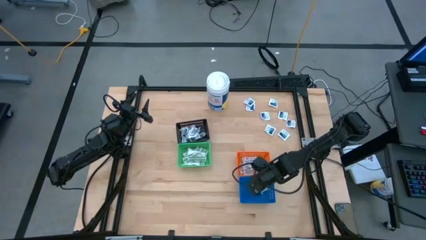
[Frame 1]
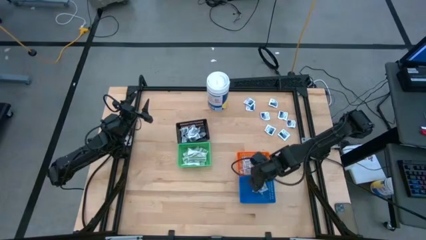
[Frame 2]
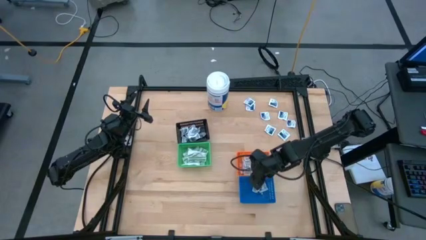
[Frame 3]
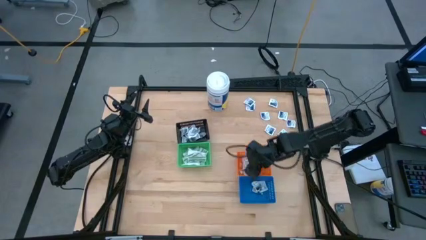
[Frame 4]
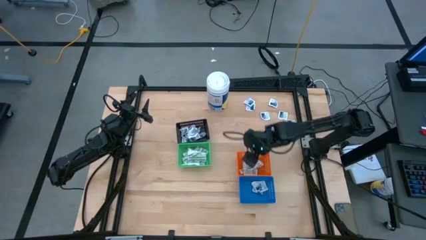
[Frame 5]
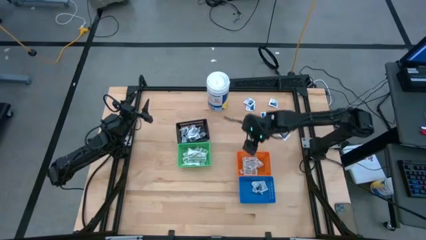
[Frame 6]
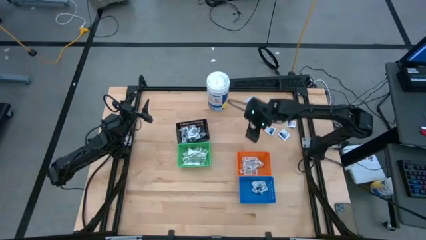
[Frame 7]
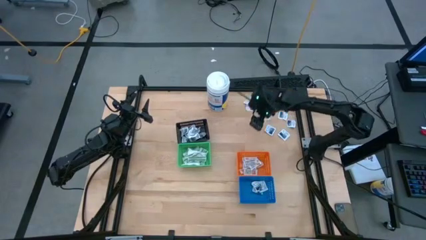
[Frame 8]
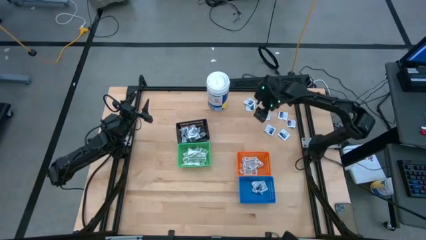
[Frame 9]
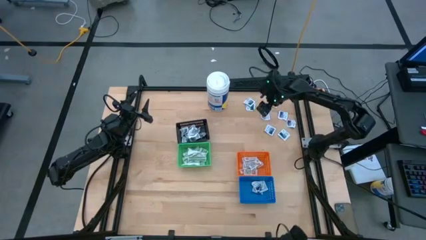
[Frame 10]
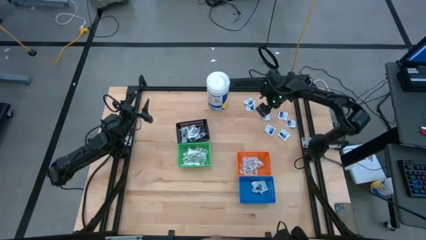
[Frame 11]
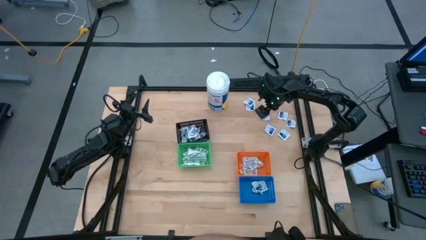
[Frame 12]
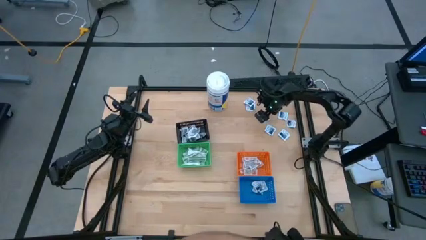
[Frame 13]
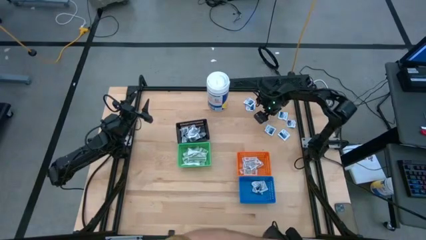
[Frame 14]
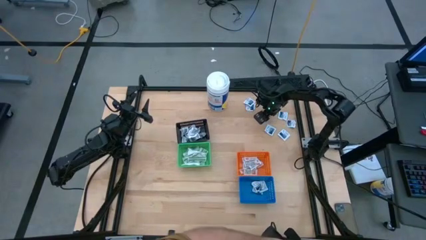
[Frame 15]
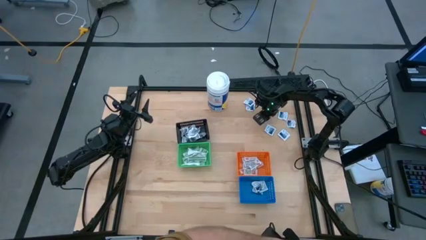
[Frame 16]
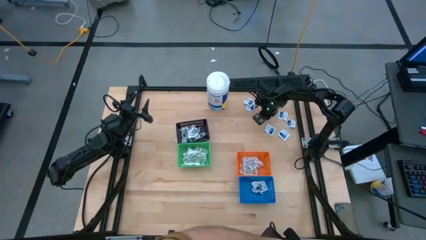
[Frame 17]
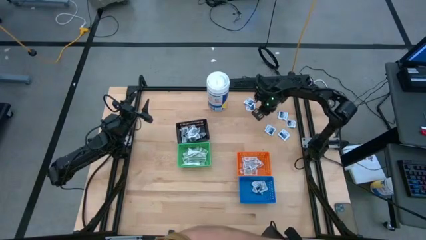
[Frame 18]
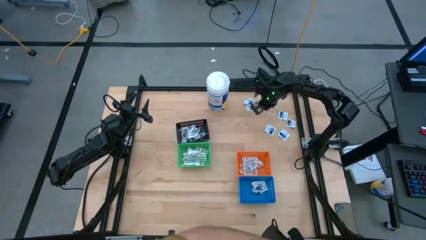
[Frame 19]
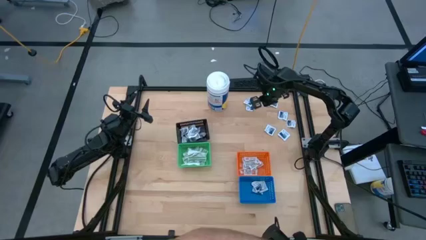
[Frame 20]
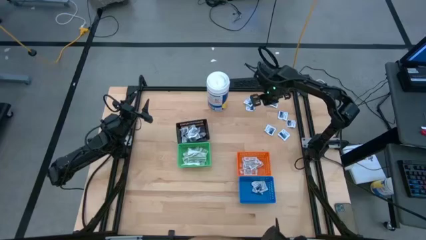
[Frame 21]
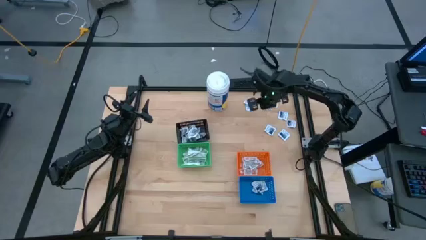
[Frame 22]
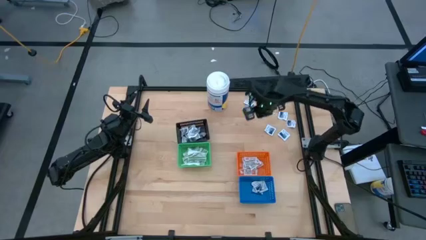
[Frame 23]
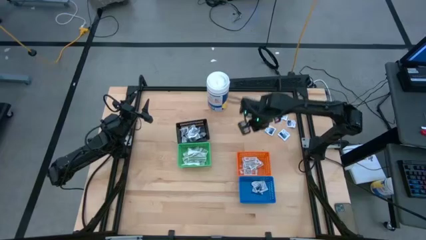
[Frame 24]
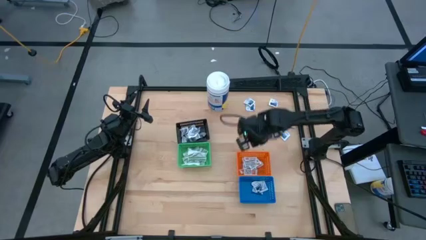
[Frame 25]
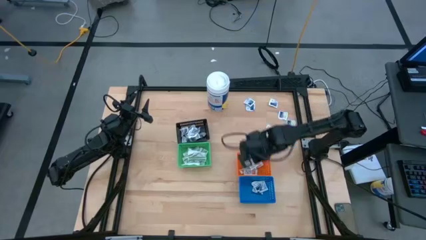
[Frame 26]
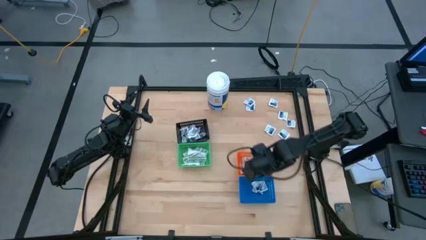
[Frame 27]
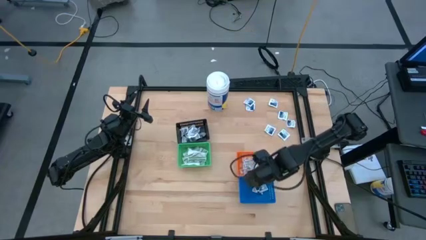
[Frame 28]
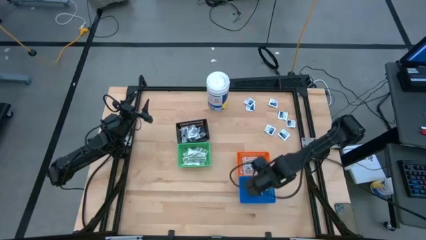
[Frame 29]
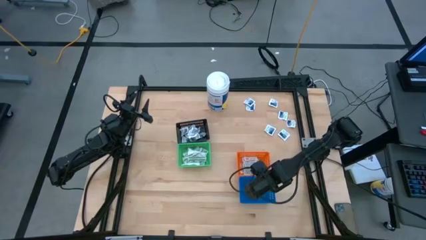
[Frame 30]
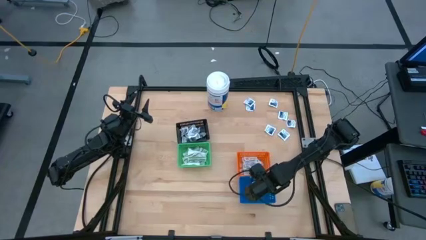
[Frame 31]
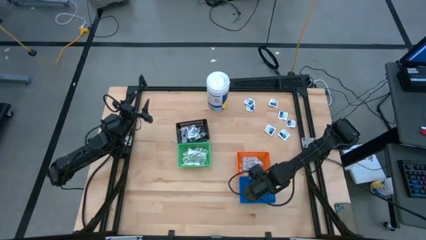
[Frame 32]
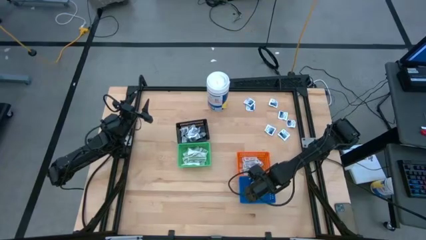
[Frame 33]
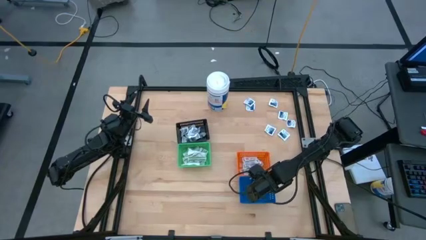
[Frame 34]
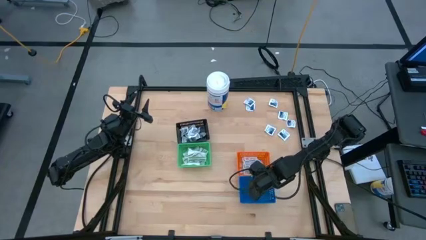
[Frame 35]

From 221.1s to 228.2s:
Task: Pick & Place First Aid Supplies
Put the blue pad into the blue bin

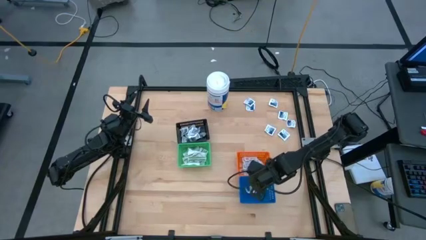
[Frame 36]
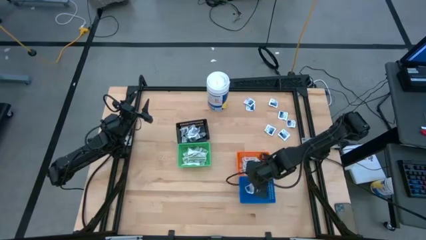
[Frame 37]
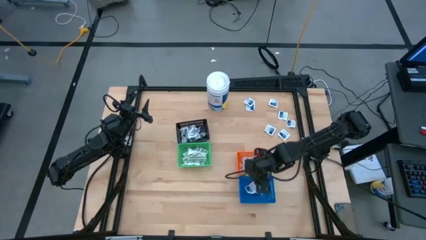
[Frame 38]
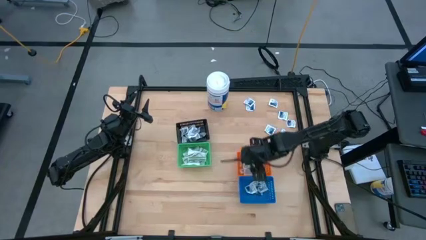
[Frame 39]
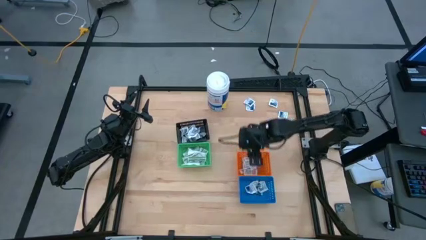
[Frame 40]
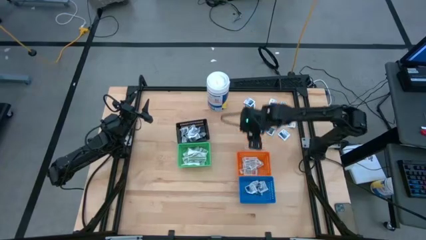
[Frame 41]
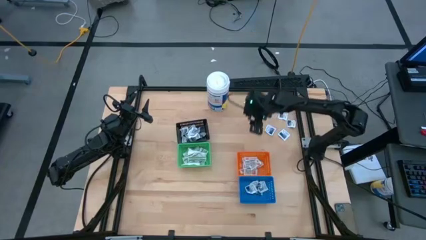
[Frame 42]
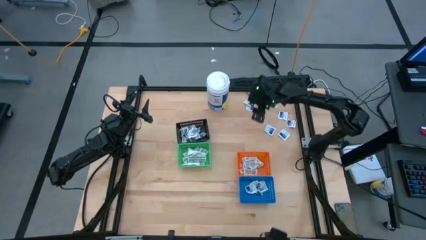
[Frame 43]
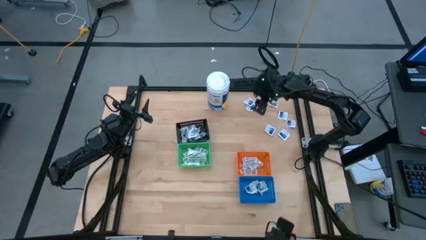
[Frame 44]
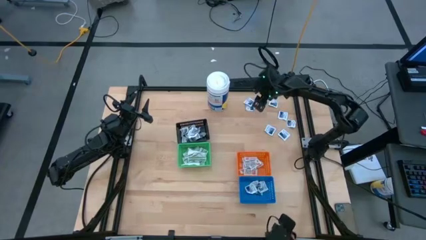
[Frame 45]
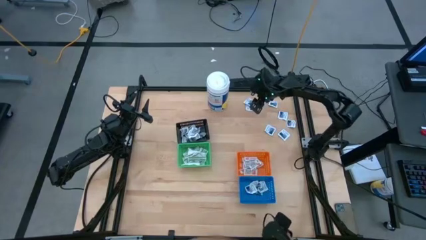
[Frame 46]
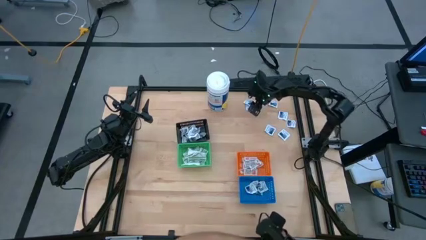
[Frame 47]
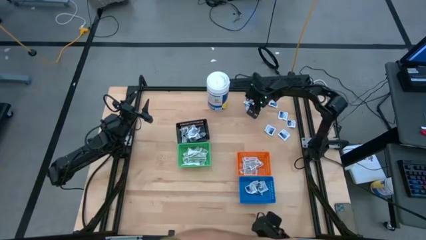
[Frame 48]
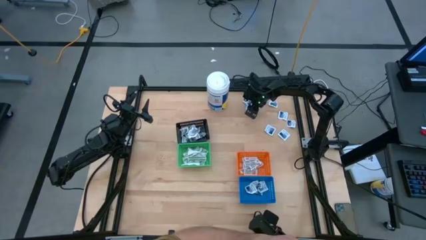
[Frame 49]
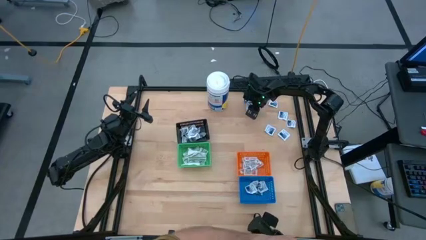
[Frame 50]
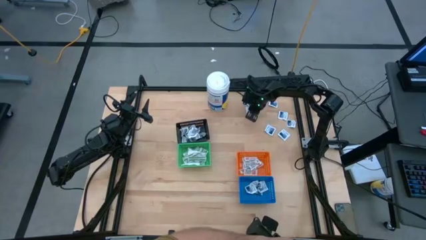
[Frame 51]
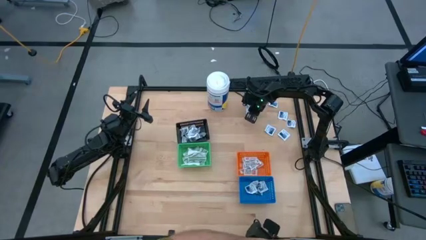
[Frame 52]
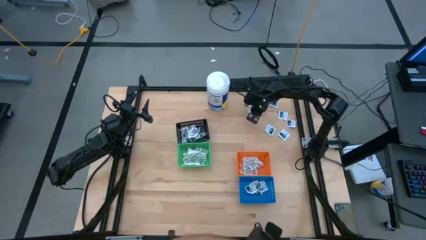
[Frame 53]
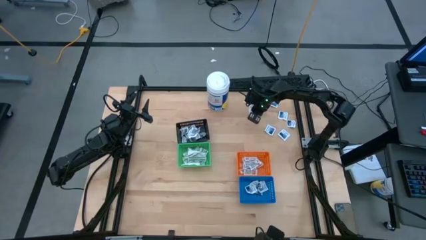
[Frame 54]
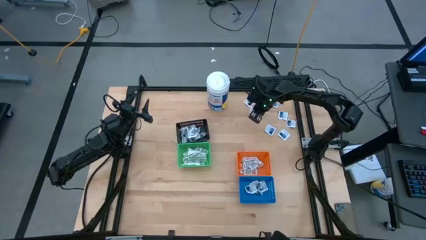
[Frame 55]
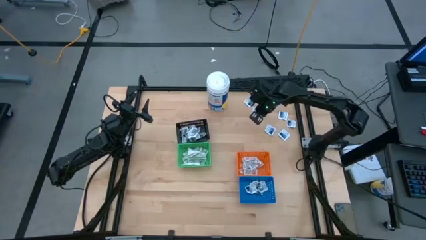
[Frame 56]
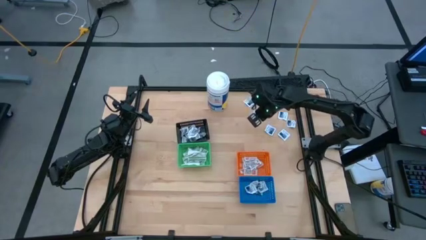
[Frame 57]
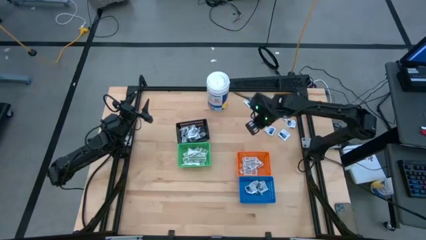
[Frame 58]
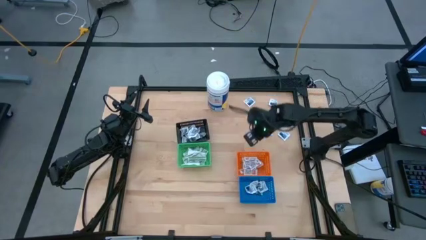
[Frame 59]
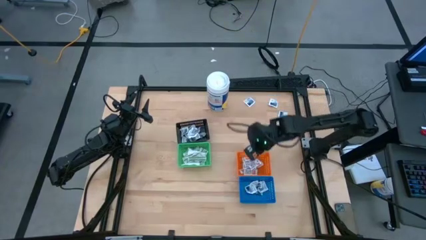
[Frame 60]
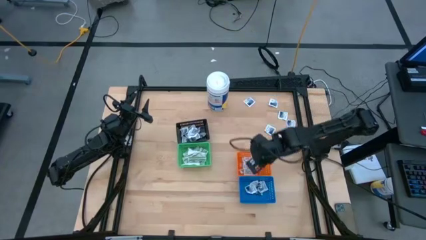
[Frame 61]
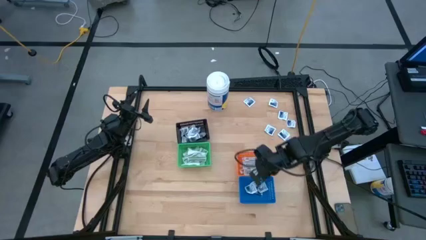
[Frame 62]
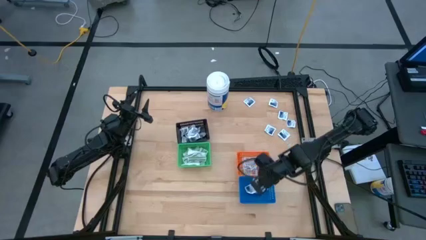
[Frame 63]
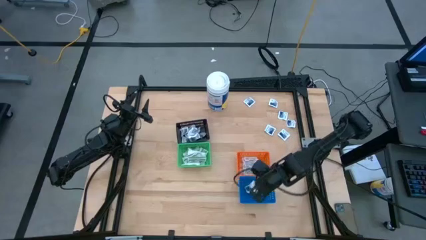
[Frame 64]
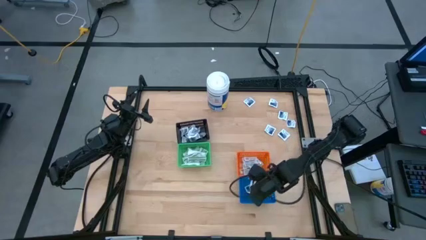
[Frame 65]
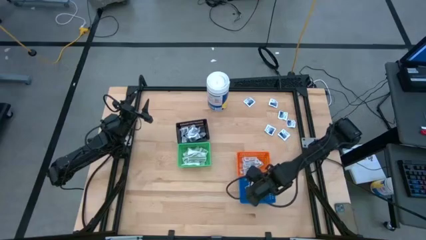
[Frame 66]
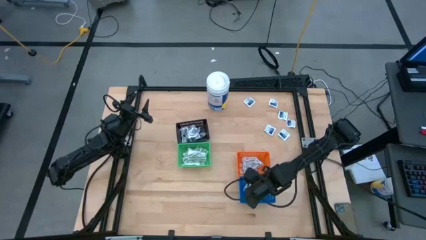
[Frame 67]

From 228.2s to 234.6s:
Put the blue pad into the blue bin

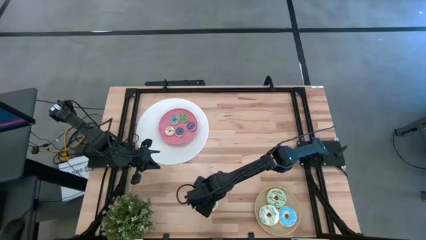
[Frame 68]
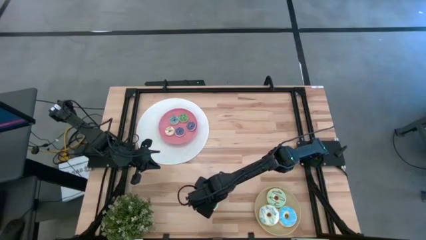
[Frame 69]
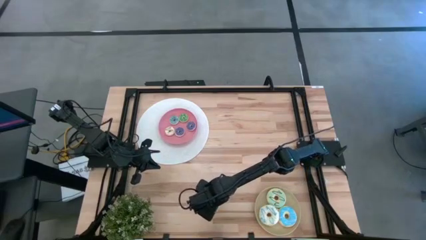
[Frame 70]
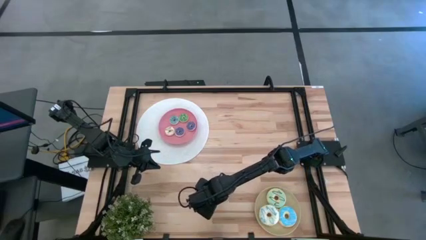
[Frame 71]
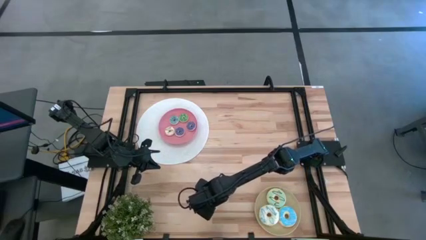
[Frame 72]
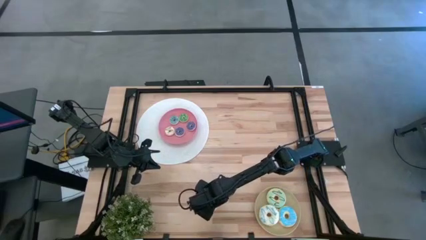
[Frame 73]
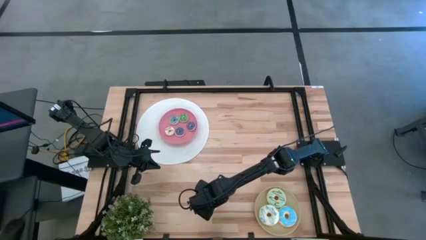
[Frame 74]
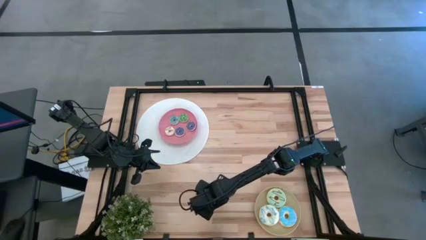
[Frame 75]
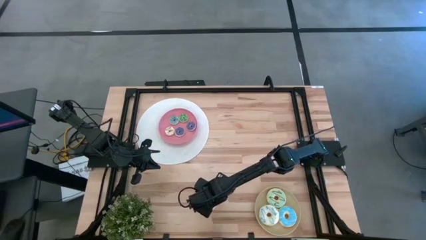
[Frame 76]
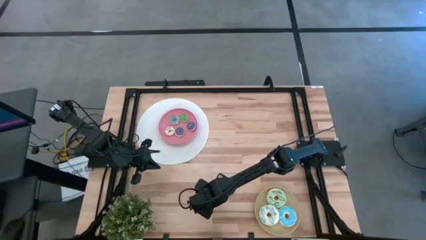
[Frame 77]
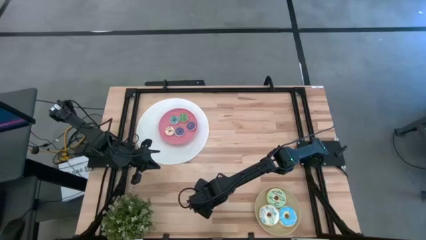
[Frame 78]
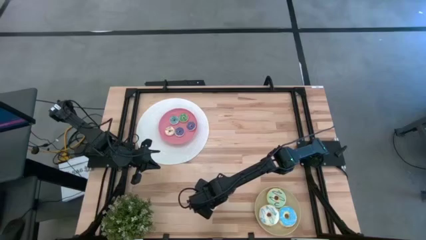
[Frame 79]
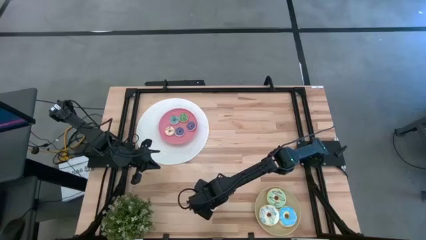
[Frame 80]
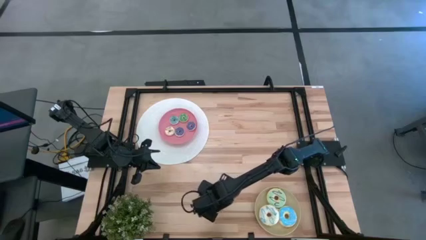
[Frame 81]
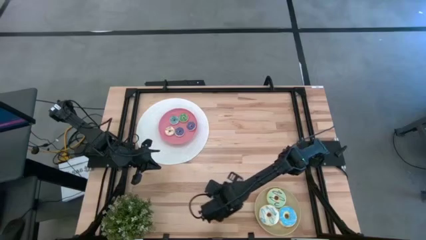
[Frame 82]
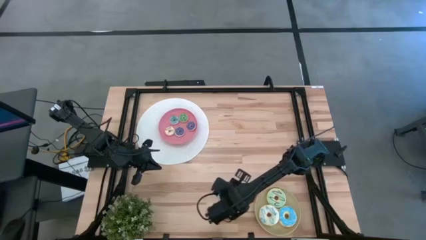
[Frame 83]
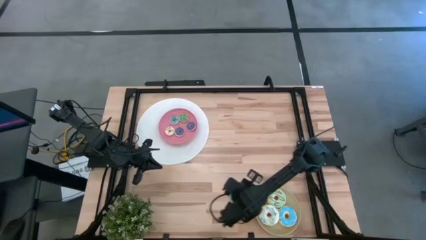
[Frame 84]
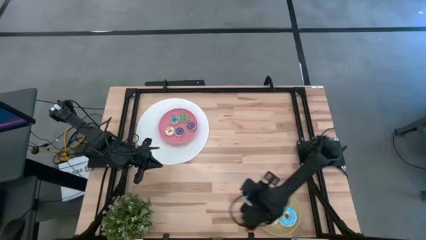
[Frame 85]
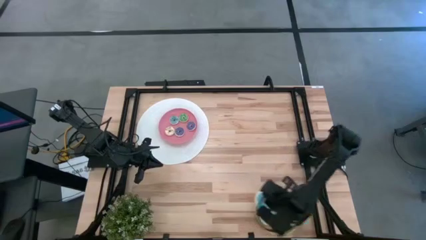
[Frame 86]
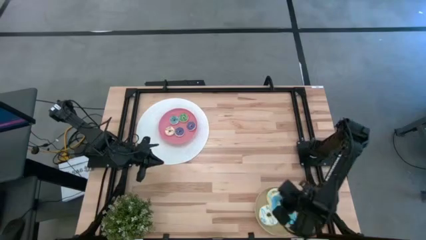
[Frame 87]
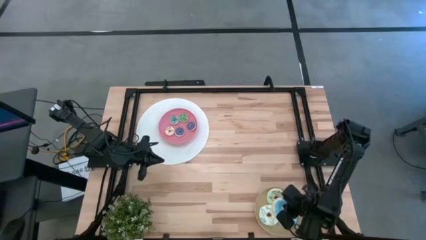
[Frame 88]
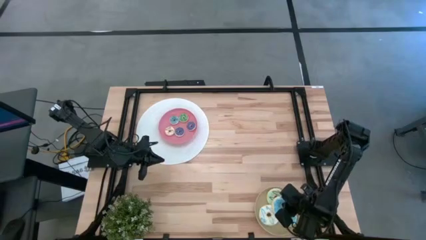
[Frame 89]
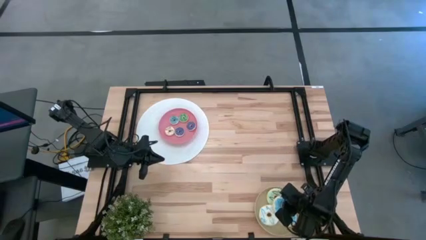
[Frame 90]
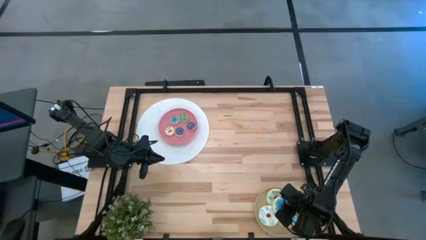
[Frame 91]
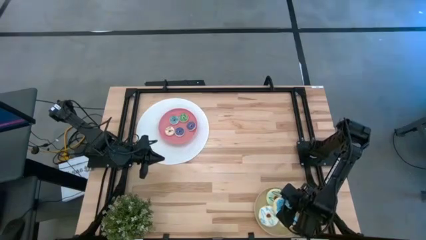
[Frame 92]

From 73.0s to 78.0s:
Task: Pick & Place donuts
Put the large blue donut on the brown plate
